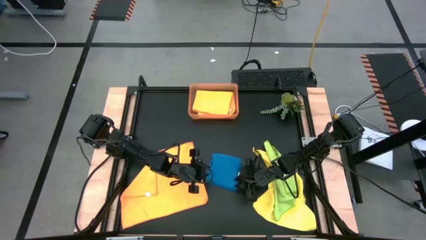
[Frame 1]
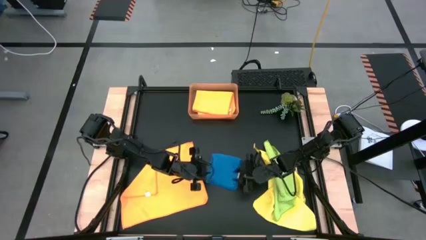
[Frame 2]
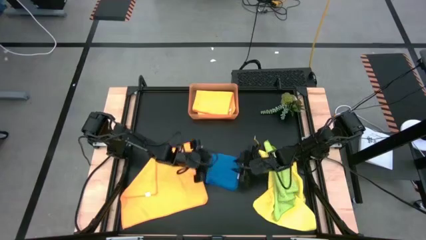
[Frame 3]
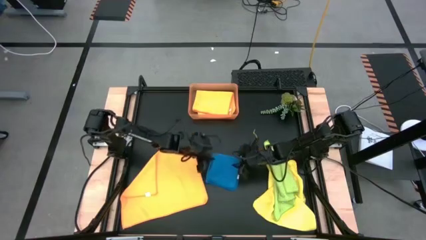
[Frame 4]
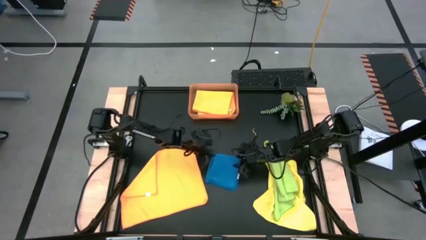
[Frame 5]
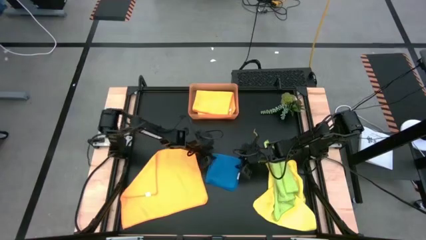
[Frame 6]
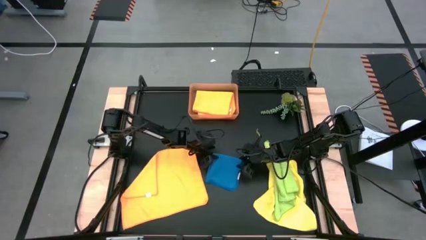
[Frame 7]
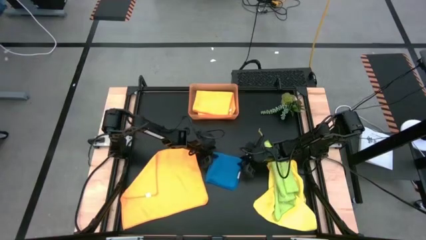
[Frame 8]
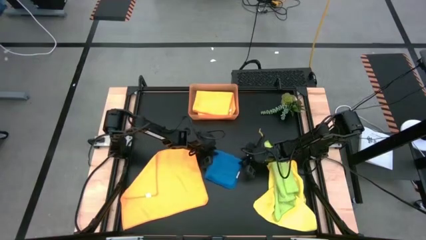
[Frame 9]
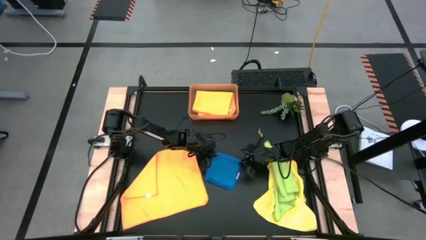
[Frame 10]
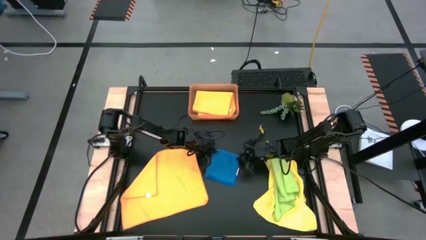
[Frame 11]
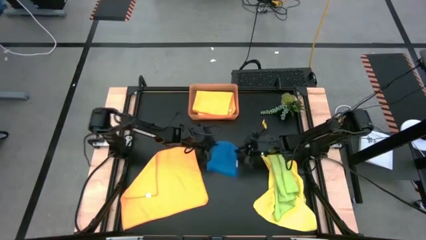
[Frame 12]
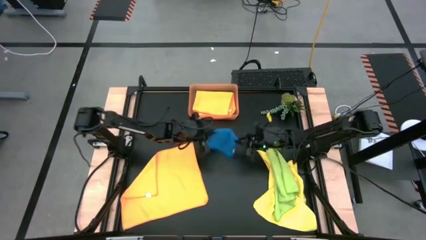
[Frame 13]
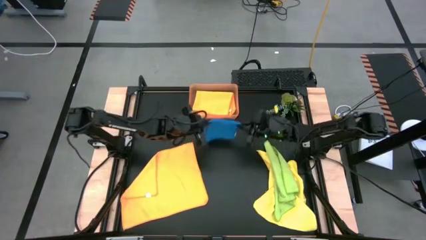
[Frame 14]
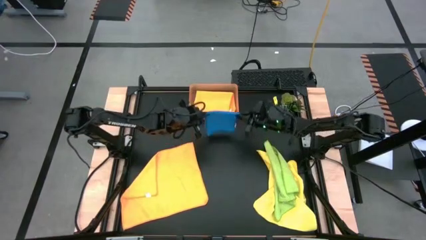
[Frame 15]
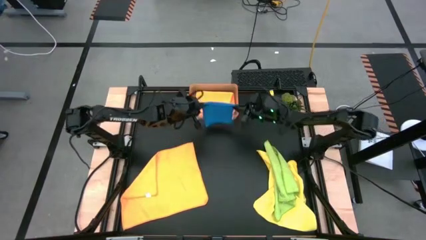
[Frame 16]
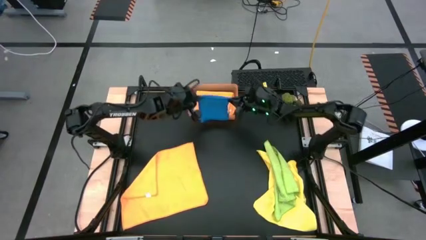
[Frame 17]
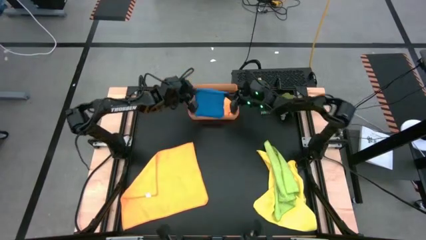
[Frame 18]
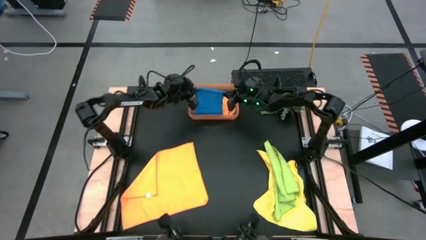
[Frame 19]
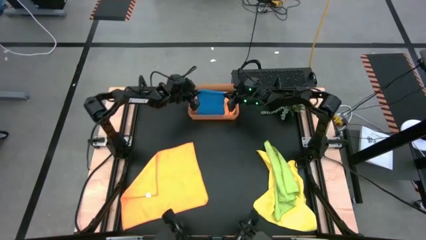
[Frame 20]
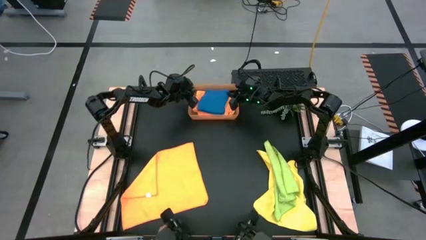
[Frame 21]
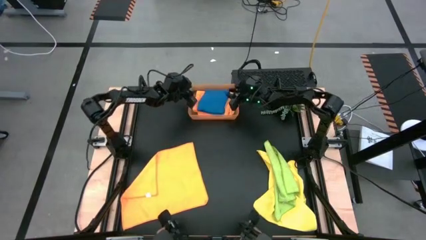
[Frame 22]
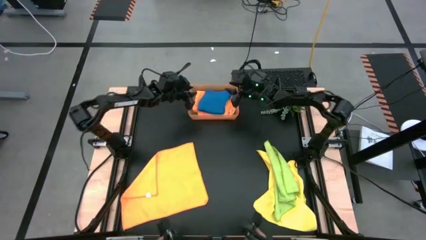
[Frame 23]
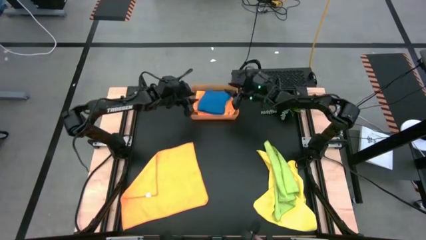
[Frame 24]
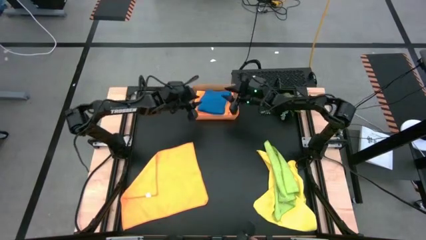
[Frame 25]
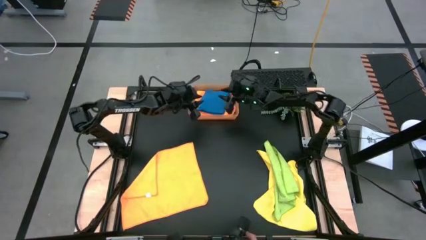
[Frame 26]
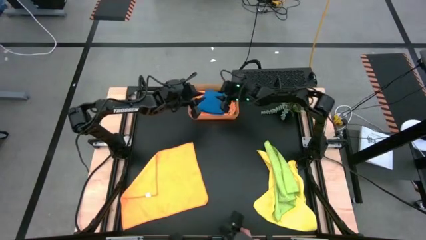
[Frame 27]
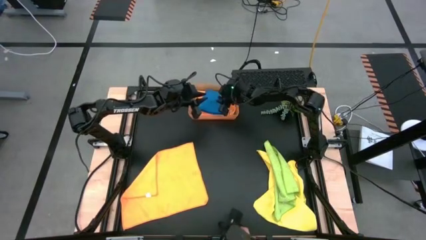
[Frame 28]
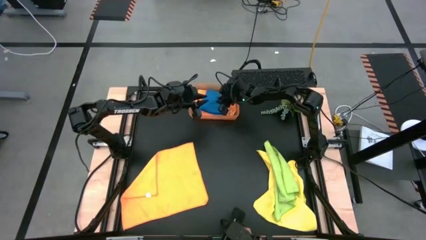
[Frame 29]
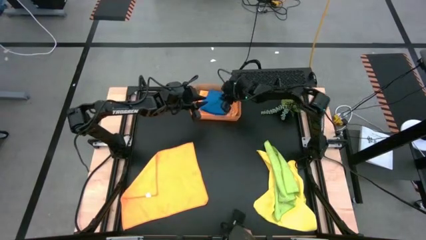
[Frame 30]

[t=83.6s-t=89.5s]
Task: Fold microfiber towels
Put the folded blue towel into the orange bin

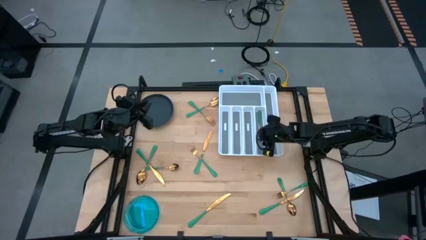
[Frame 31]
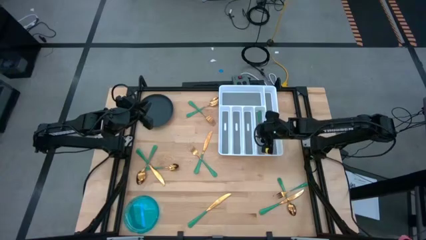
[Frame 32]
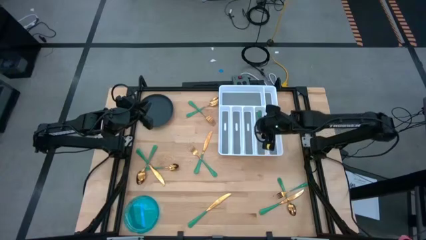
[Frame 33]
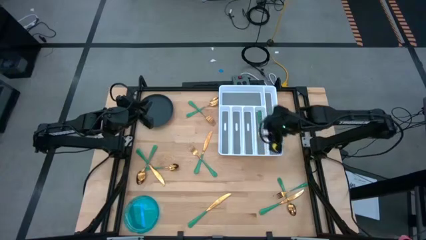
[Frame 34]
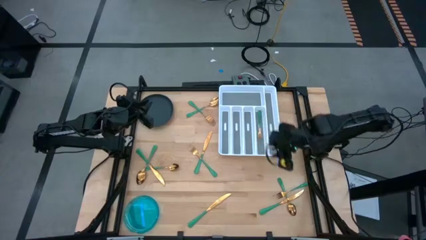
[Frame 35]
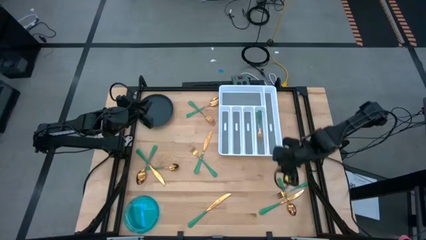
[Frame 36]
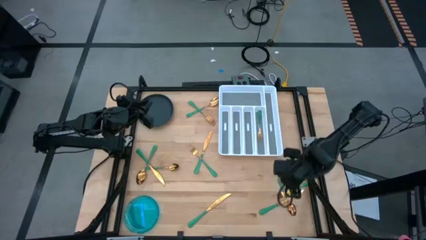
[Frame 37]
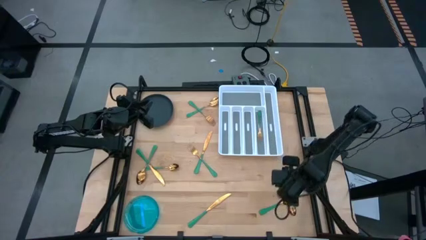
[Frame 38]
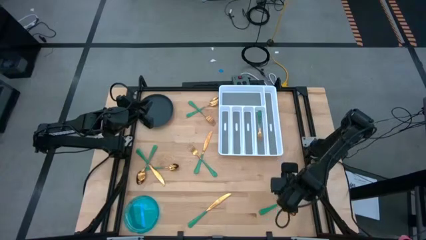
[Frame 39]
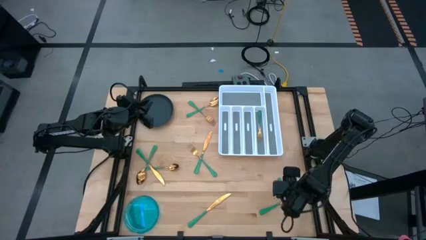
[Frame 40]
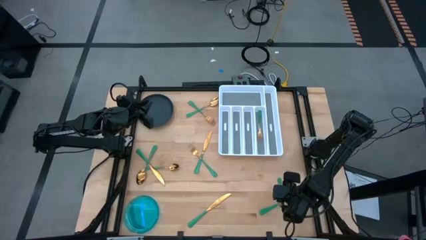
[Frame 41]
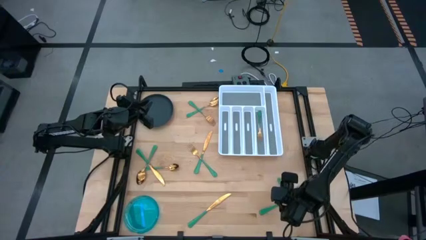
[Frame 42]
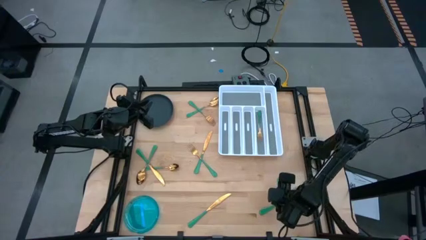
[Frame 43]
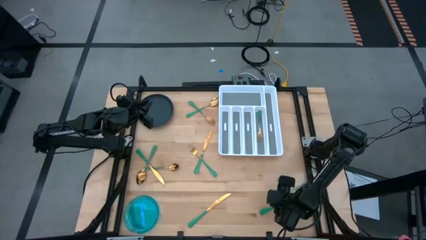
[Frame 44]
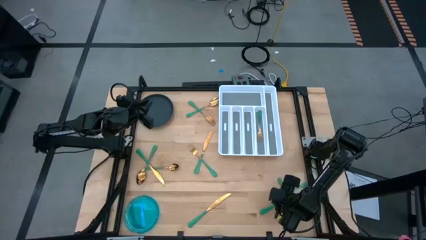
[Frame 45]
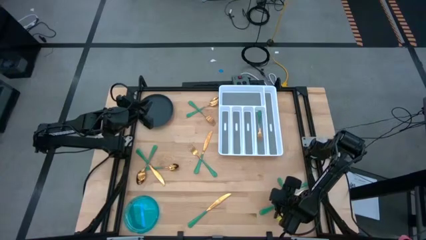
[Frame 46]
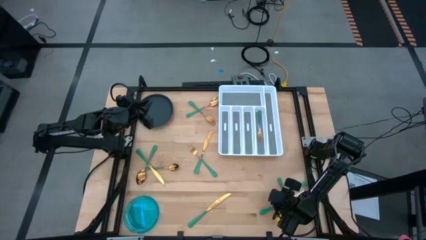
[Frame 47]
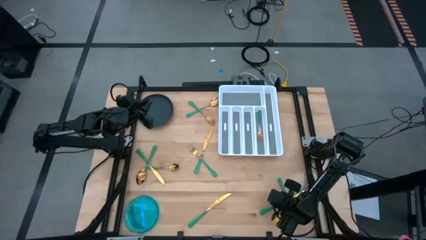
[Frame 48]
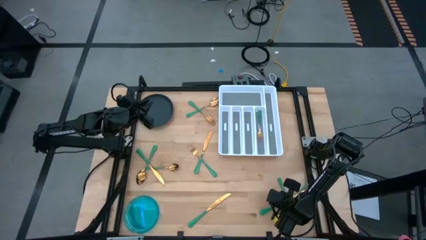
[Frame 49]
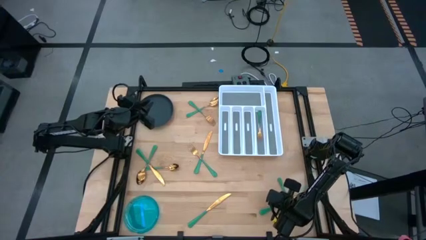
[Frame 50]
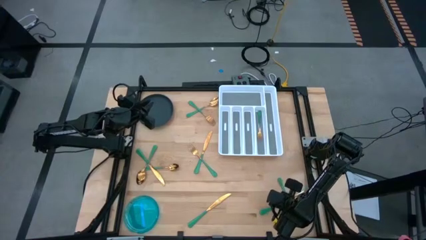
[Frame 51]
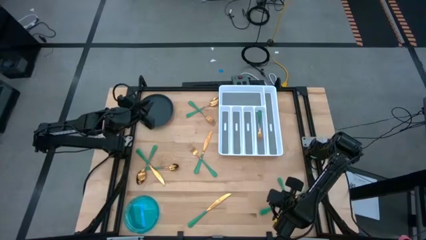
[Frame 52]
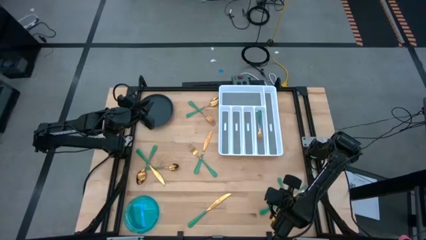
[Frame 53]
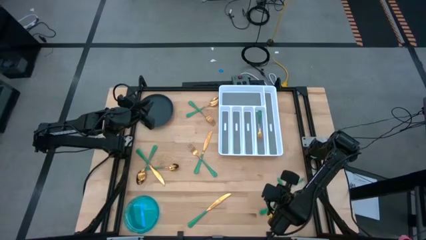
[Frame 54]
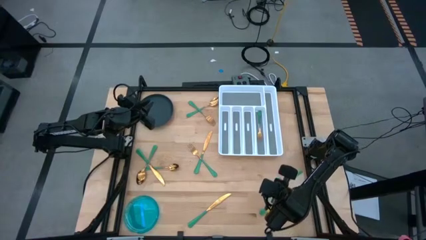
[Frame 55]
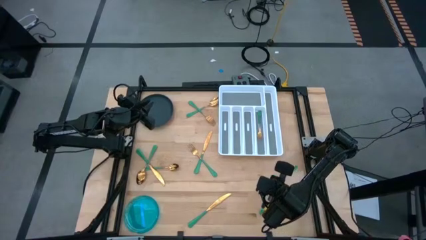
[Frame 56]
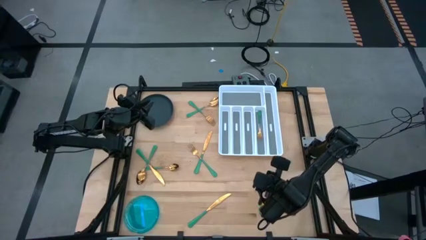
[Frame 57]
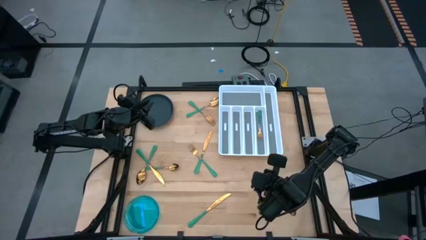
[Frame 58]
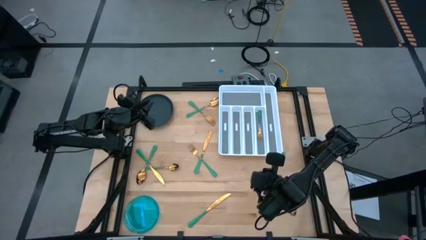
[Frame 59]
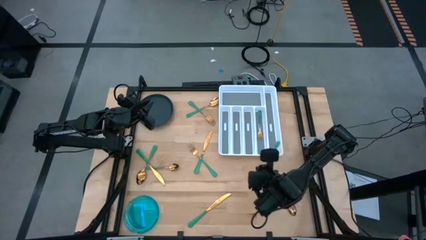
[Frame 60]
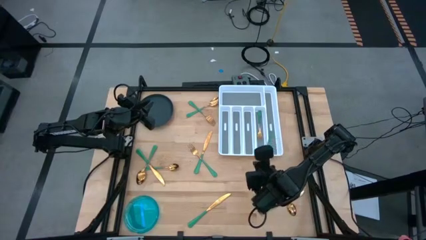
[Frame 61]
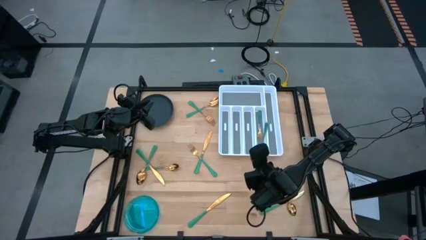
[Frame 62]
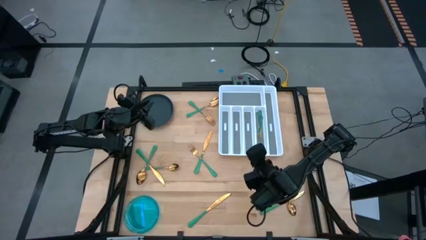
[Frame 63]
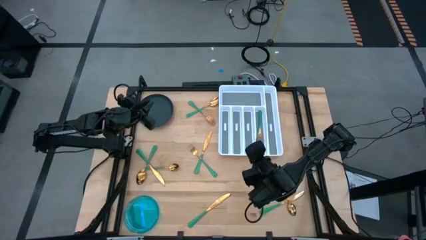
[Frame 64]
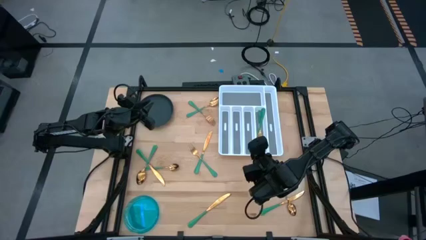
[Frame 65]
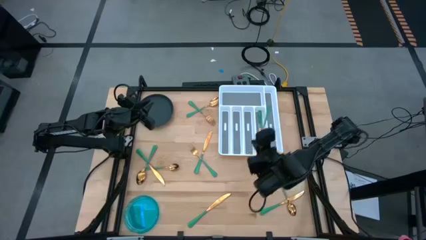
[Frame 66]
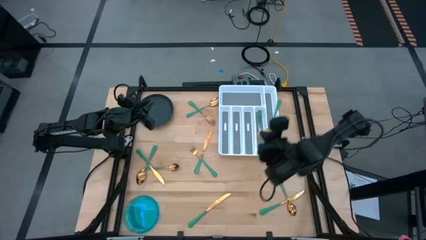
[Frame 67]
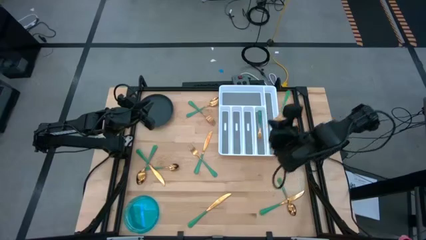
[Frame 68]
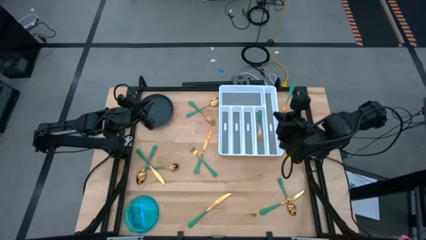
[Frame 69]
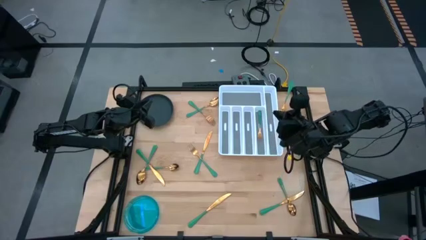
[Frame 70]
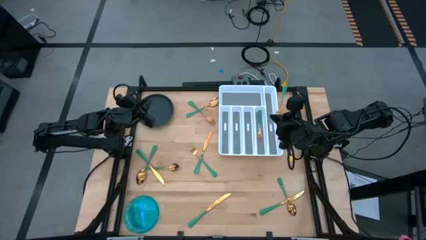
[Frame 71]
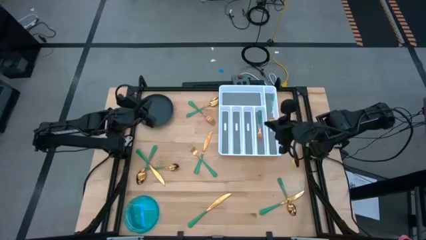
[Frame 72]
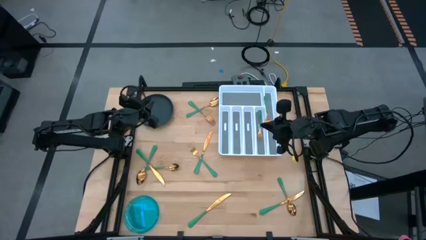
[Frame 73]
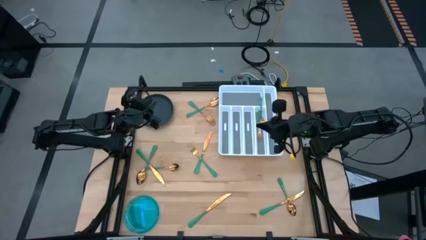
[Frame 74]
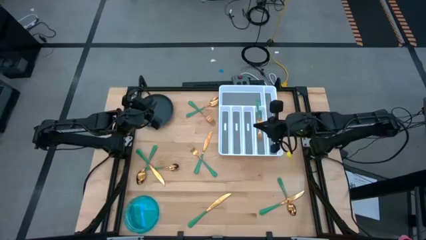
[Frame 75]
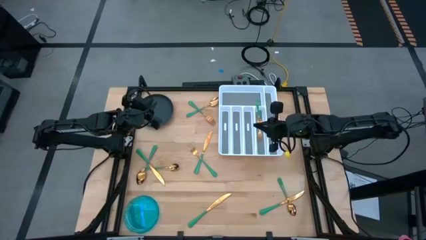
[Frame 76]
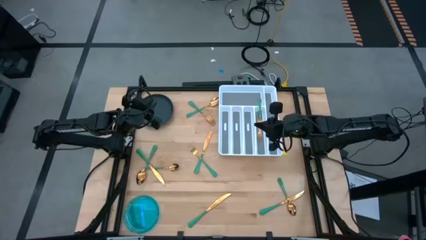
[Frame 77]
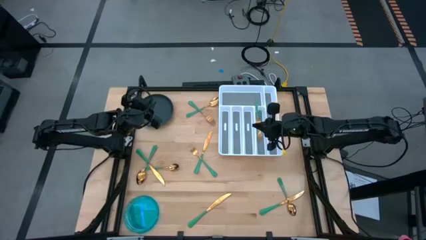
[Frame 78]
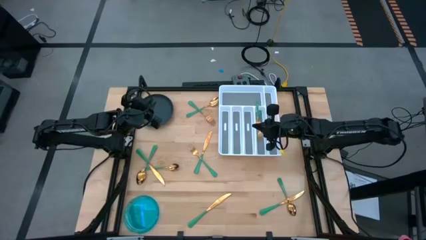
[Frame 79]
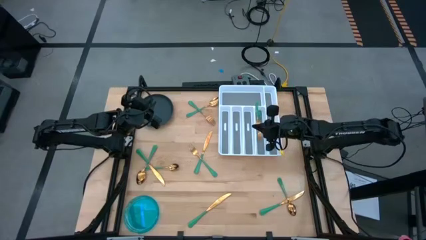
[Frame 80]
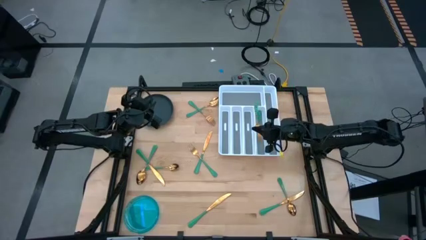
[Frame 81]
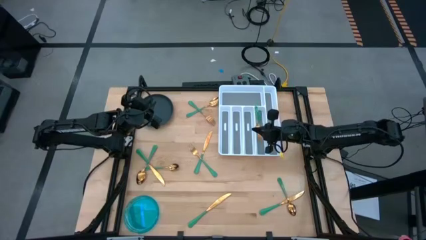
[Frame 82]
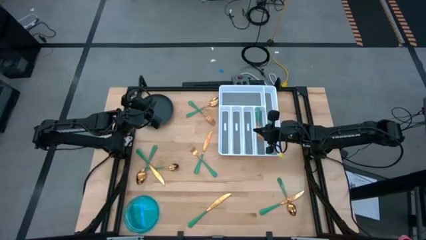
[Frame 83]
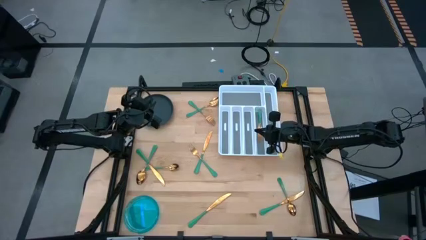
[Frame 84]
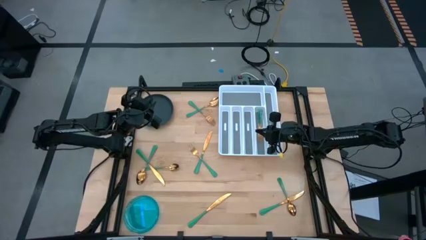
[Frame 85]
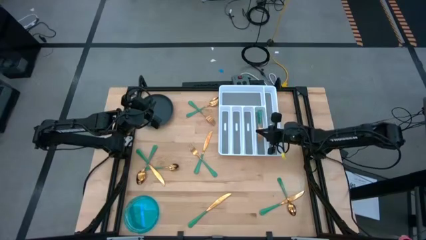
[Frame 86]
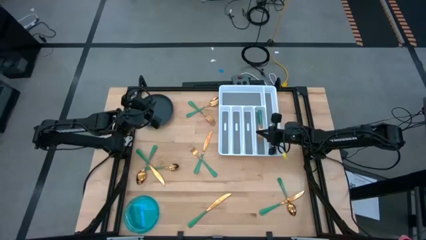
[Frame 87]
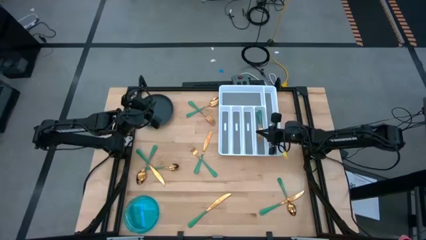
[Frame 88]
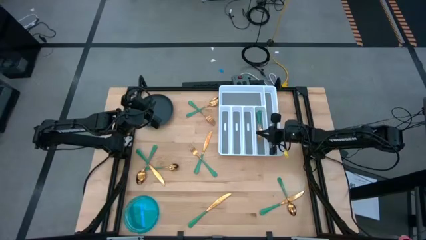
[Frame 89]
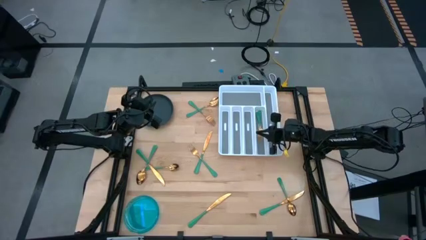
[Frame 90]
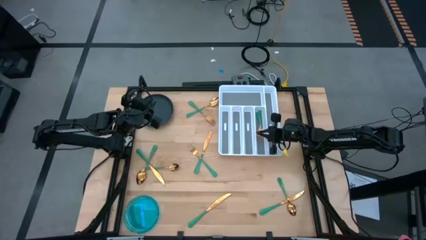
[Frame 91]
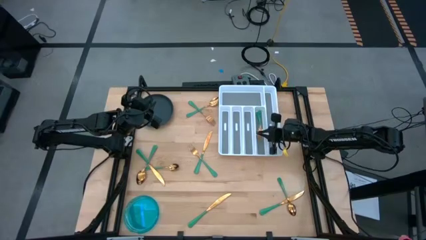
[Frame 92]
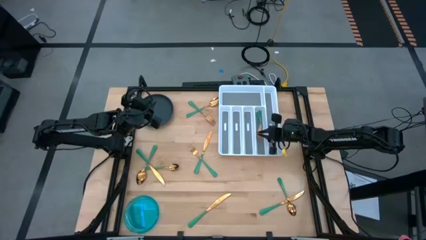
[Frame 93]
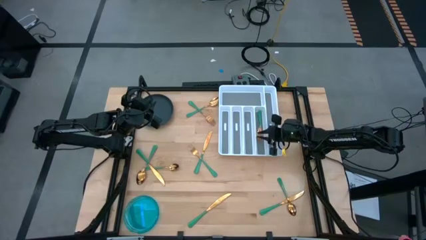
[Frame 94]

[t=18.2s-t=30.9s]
Task: Sort silverware
Put the bottom right green fork into the silverware tray
